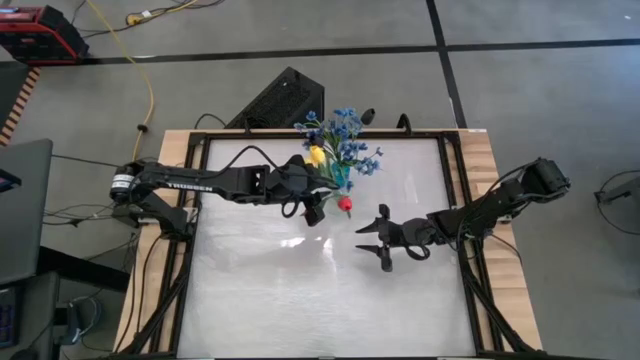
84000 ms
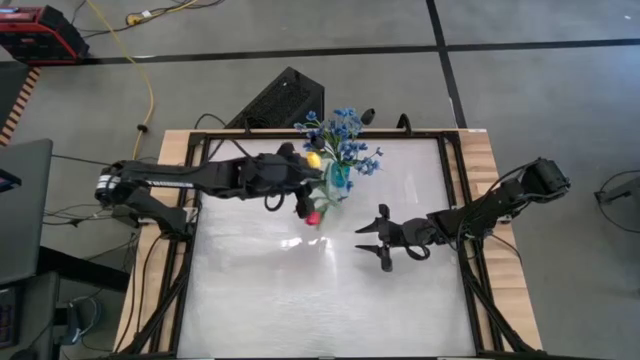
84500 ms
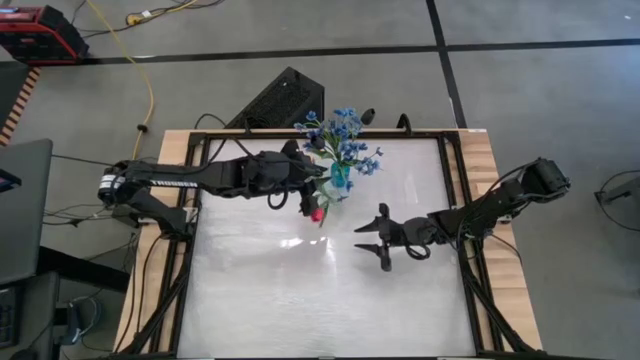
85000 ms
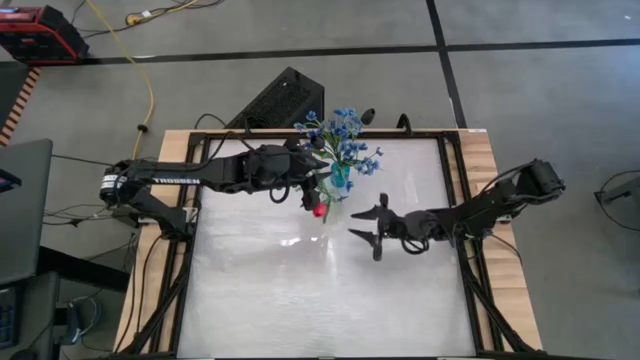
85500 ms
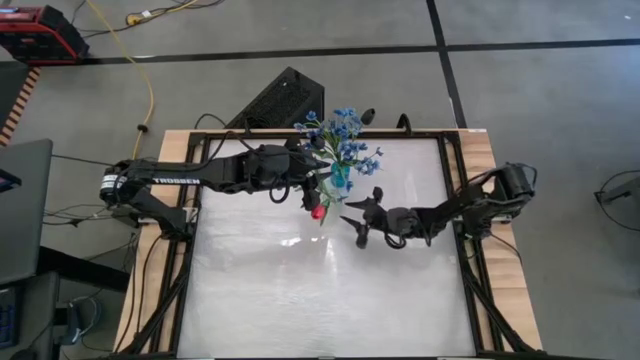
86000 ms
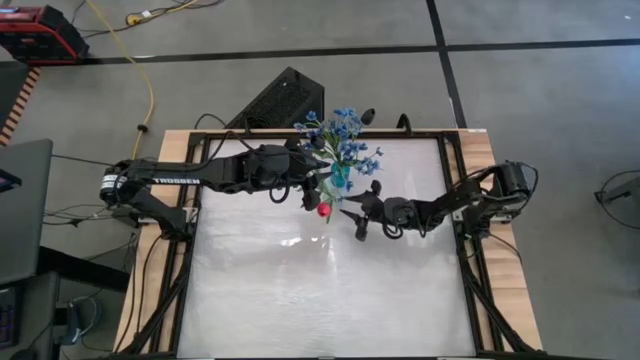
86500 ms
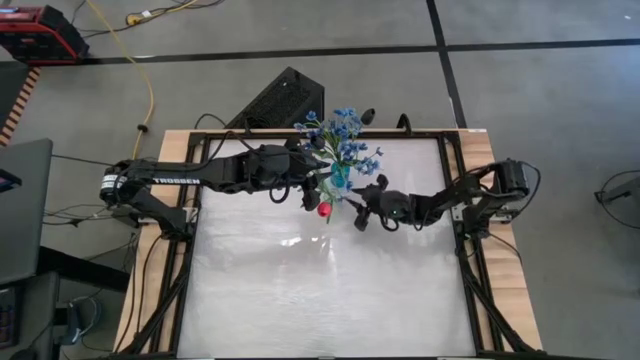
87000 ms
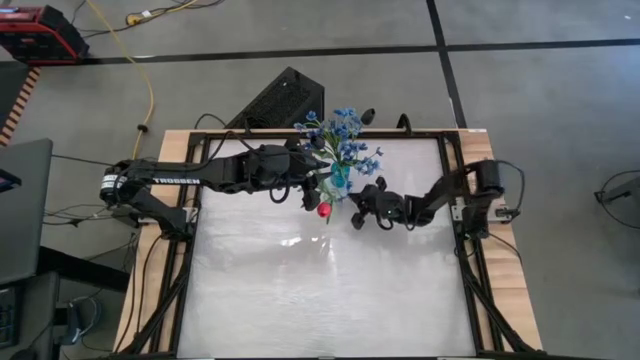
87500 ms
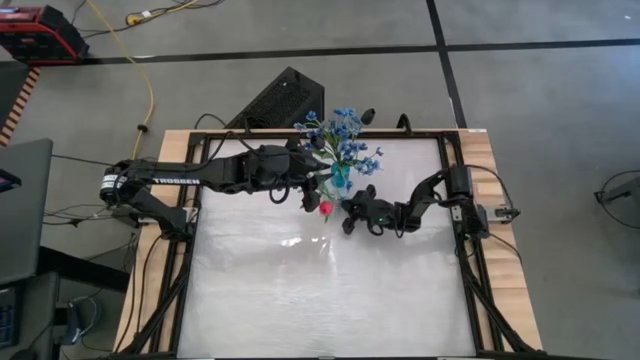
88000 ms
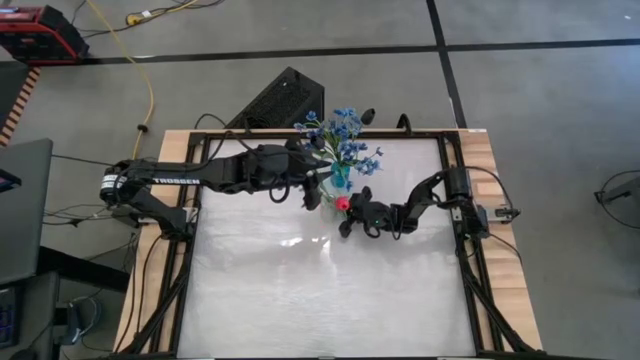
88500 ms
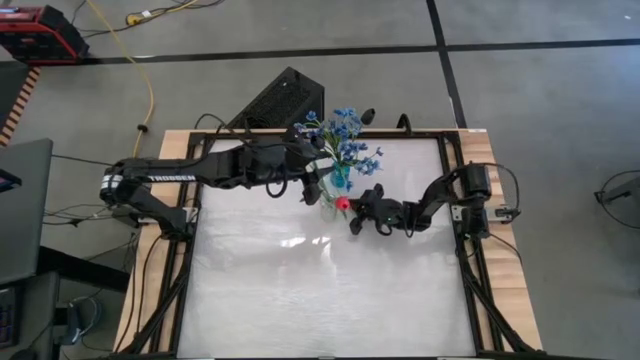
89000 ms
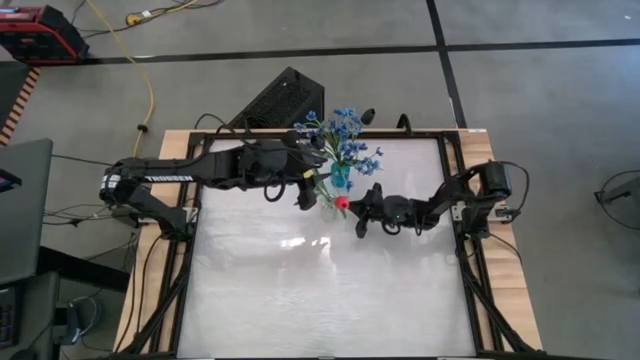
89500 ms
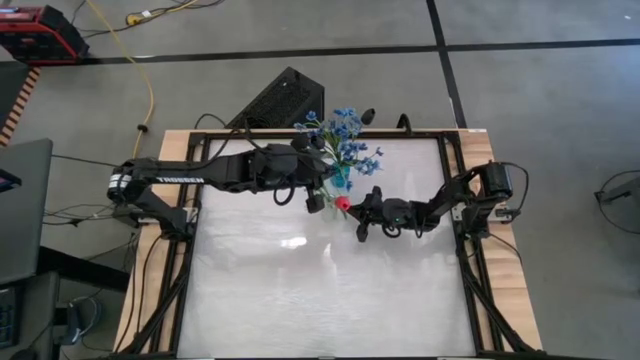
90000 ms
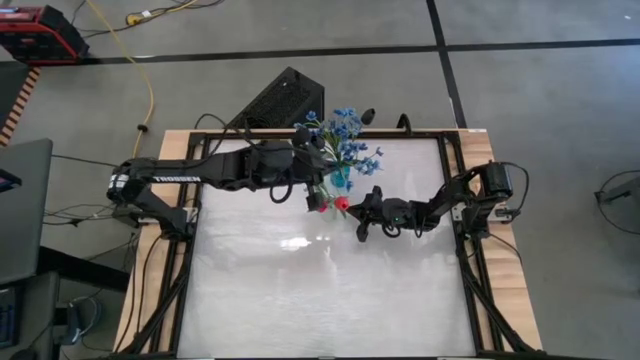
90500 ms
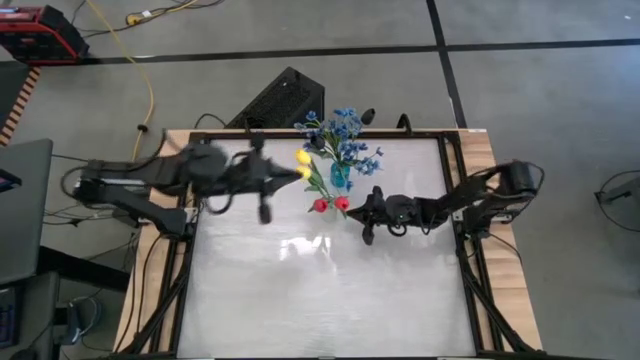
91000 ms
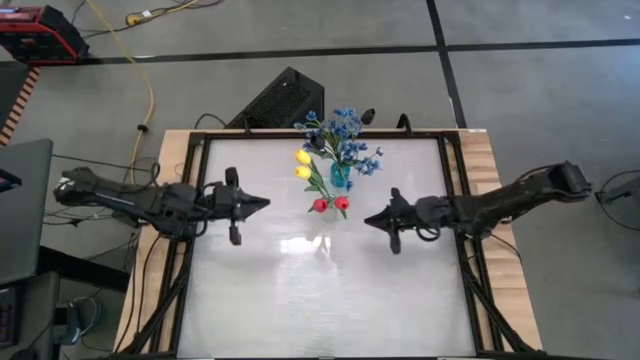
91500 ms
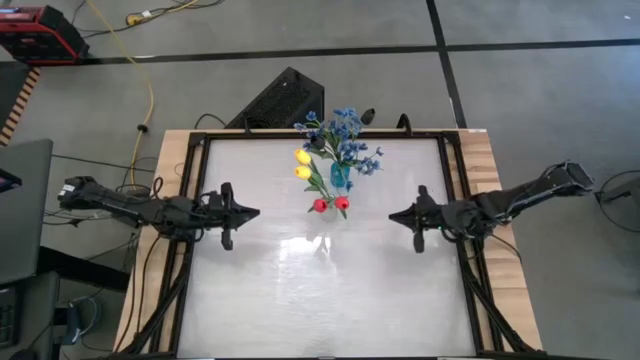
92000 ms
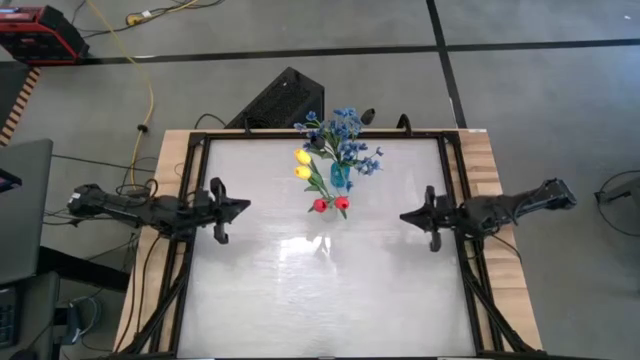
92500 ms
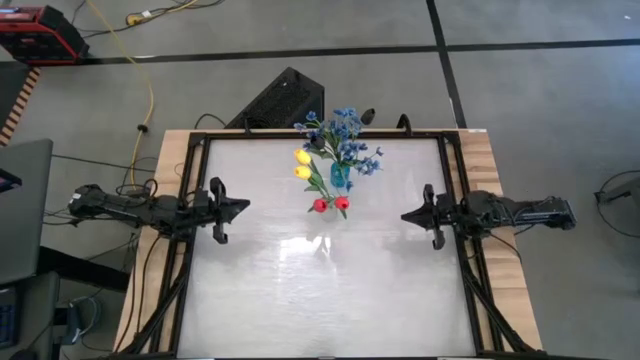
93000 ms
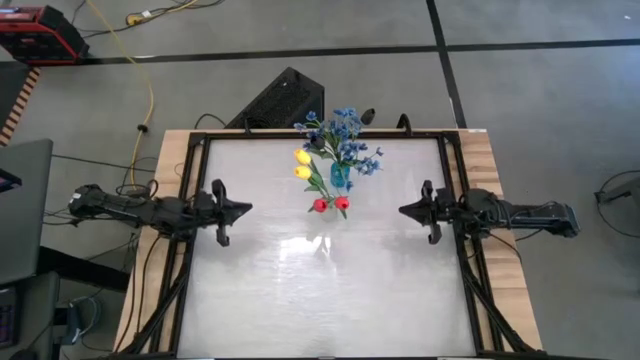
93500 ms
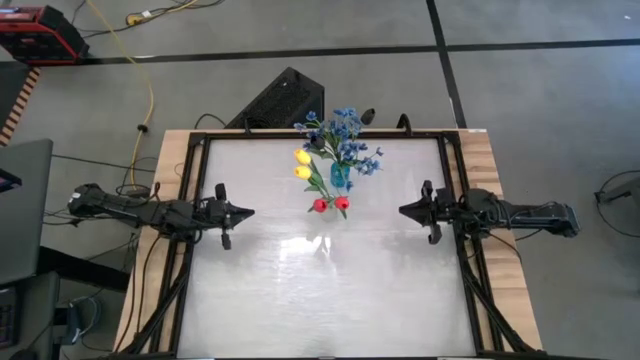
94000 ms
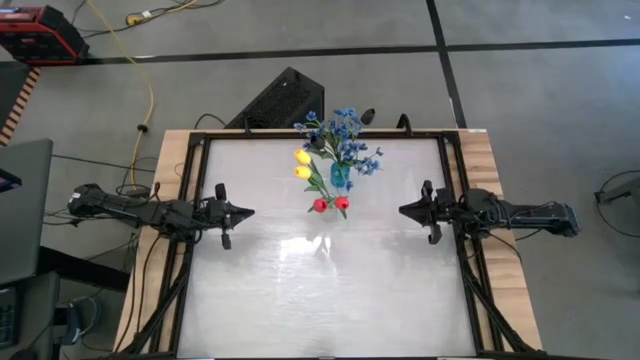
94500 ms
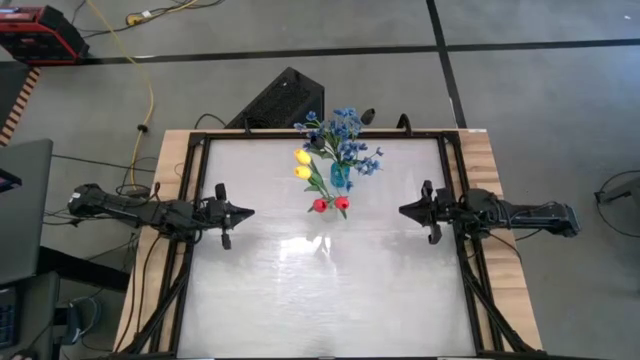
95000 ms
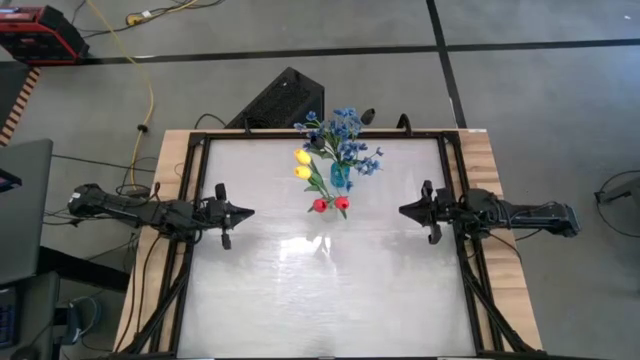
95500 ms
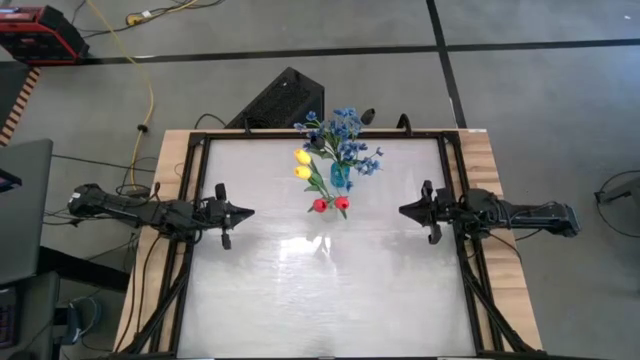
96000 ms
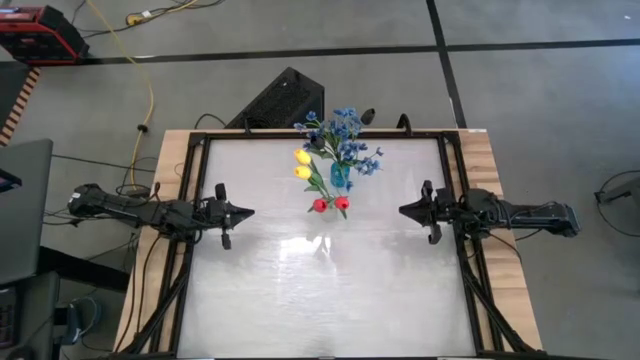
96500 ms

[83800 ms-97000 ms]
Task: Sort flowers into vase by color
Return to Home Position

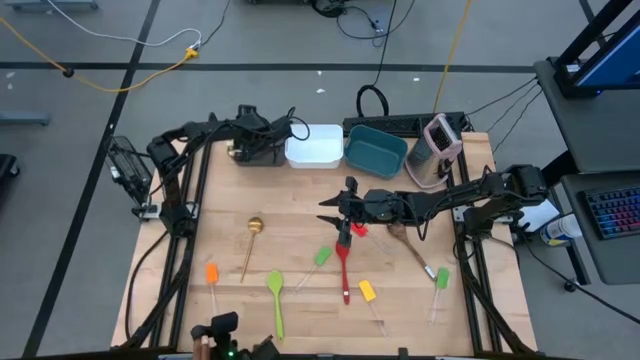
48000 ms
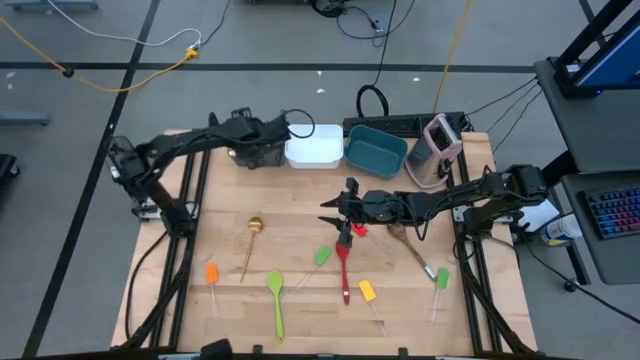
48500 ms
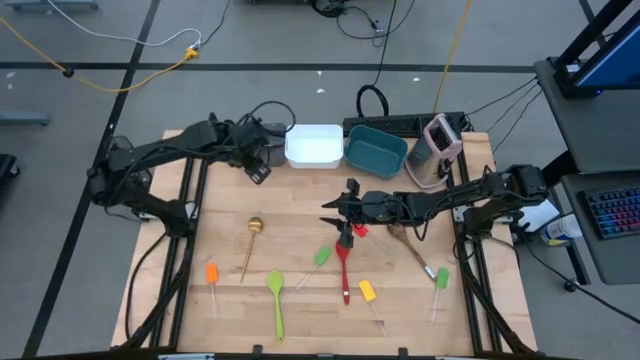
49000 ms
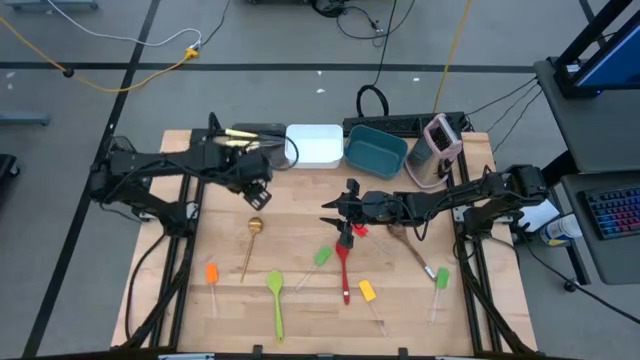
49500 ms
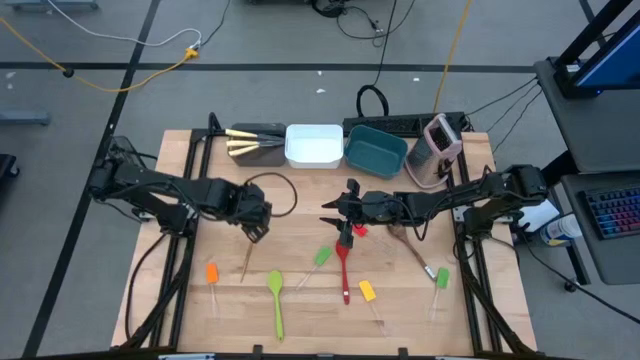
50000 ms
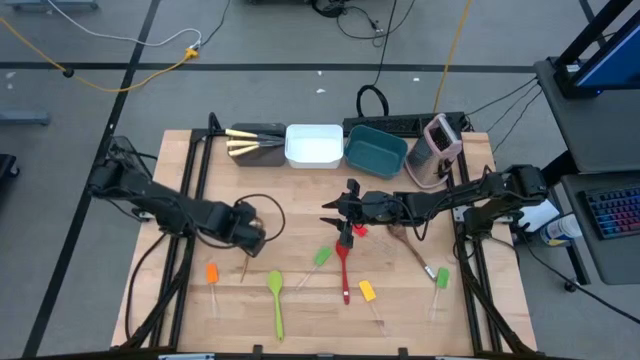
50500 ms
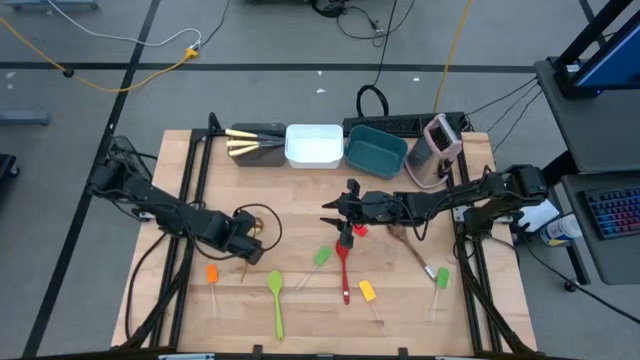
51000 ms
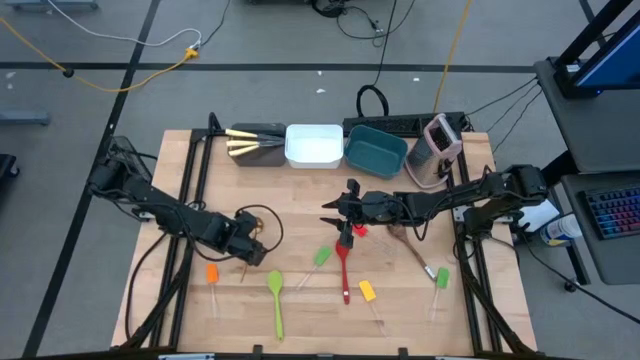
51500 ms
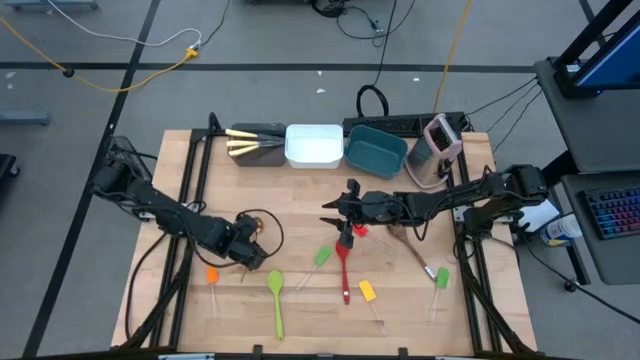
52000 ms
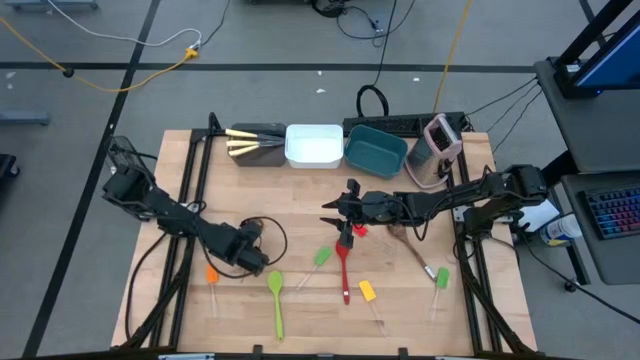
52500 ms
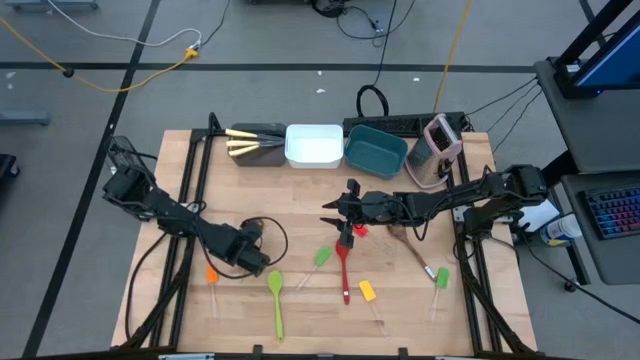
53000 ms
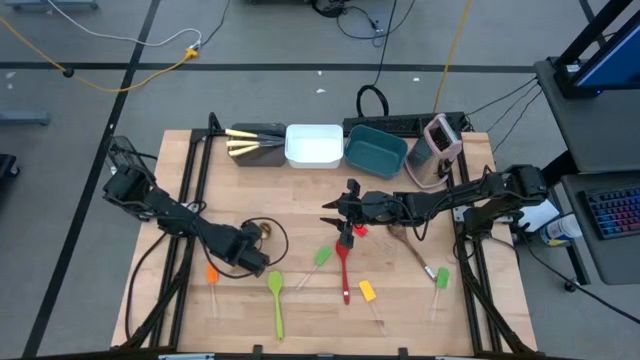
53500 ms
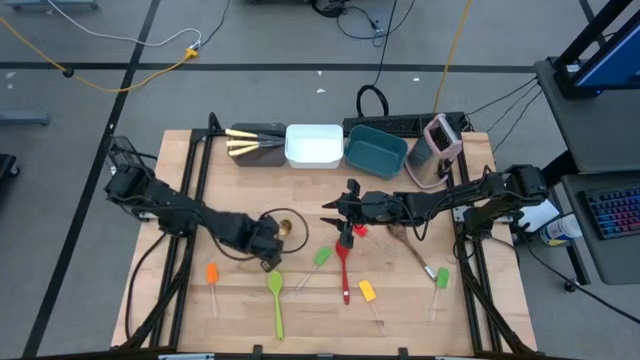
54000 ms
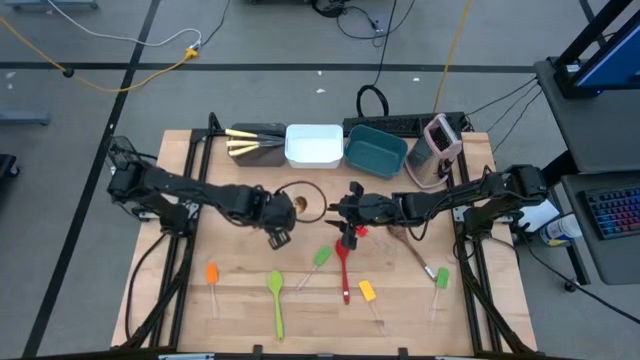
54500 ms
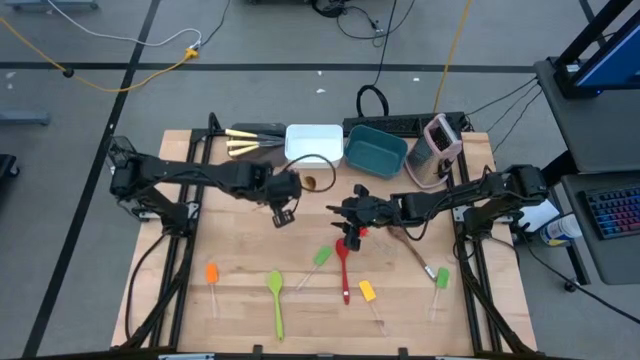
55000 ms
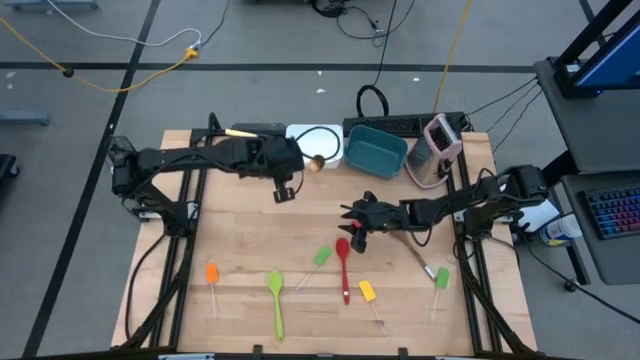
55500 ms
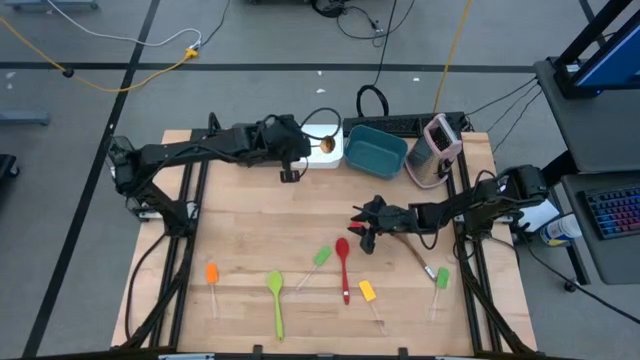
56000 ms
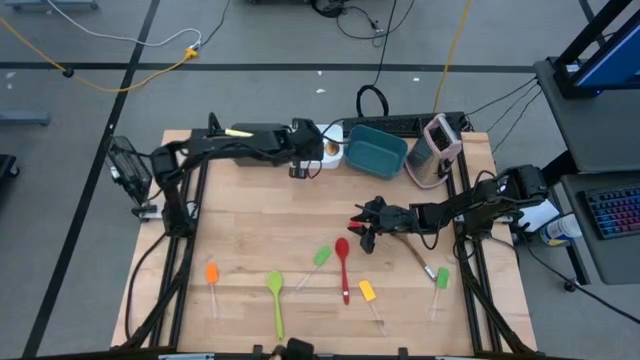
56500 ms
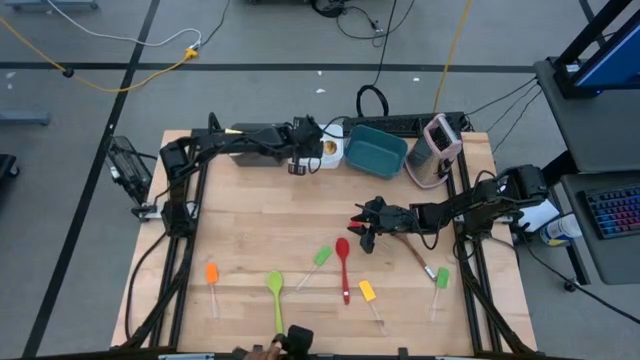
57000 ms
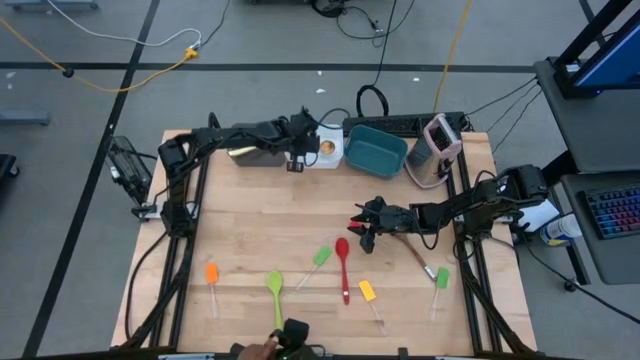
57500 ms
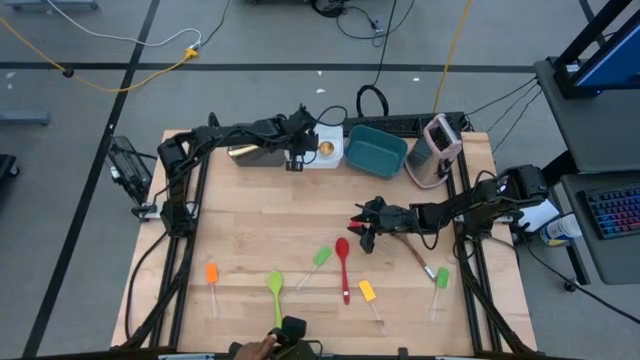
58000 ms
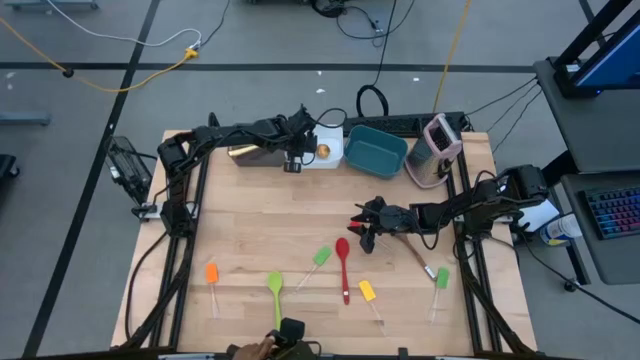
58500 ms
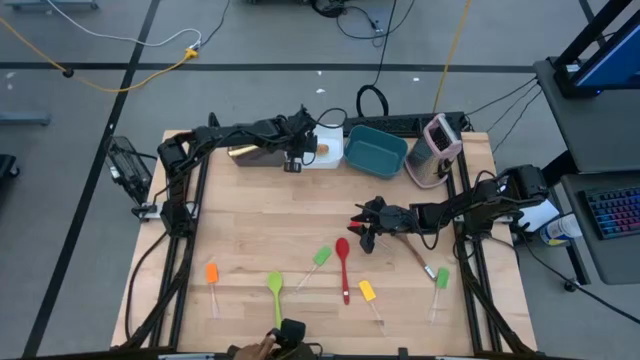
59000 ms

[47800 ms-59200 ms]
Task: Pick & Place Kitchen Items
Put the gold serving spoon into the white bin
